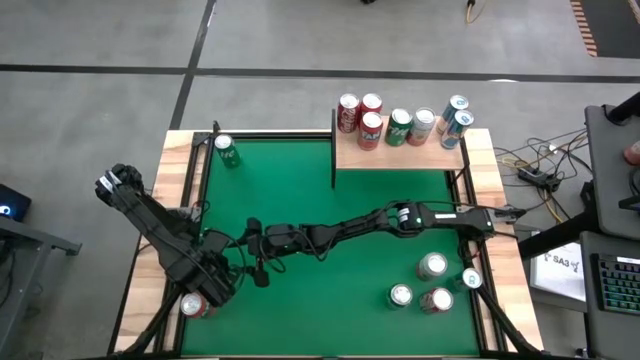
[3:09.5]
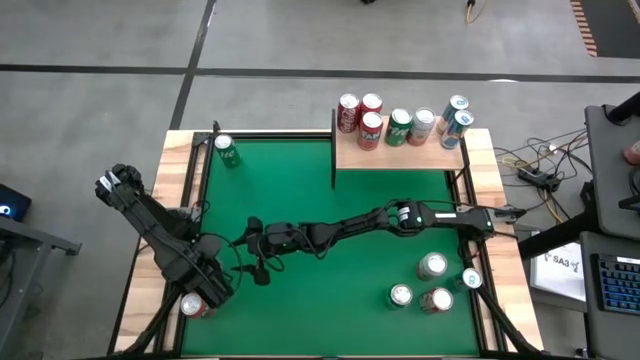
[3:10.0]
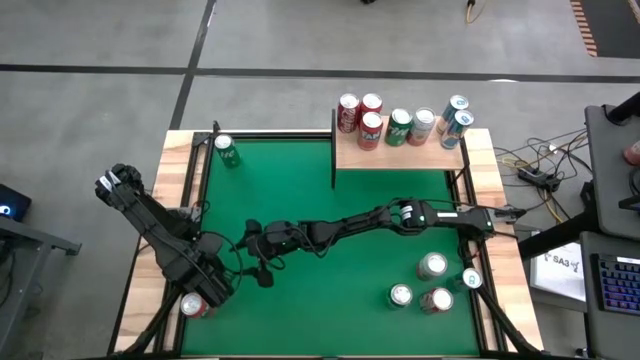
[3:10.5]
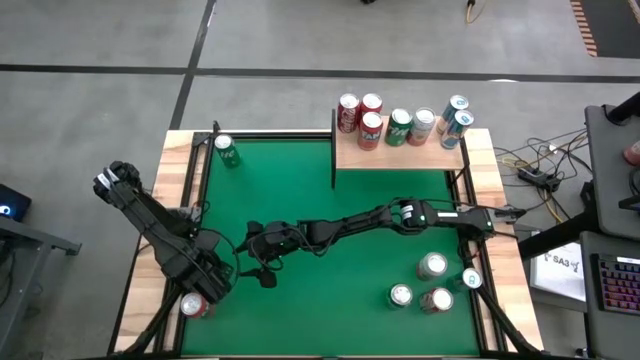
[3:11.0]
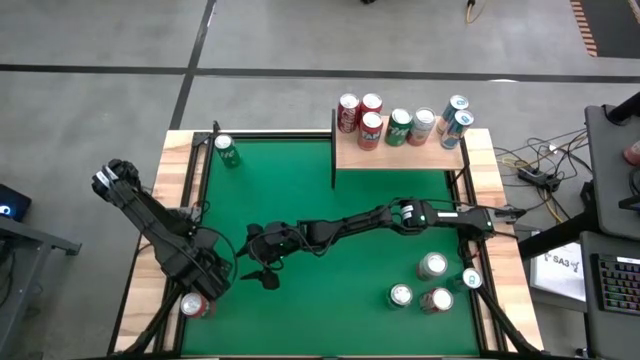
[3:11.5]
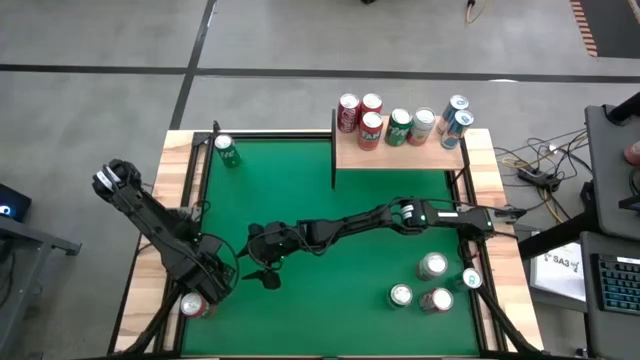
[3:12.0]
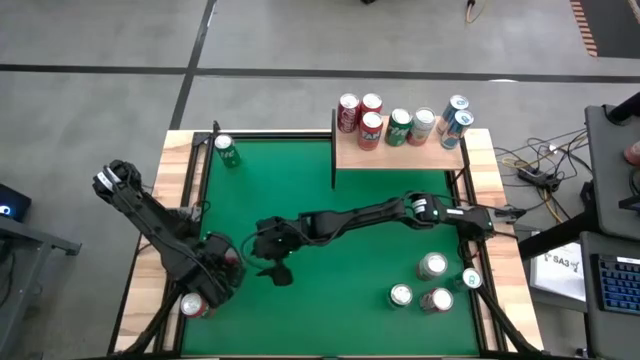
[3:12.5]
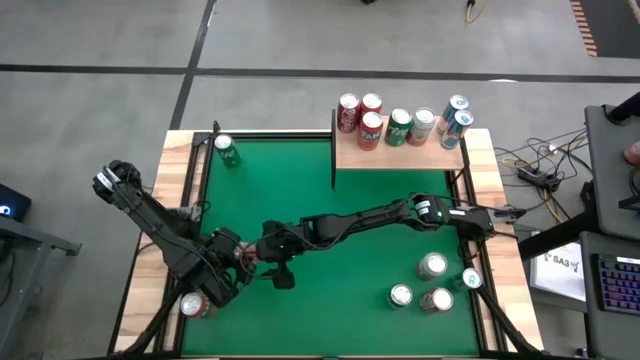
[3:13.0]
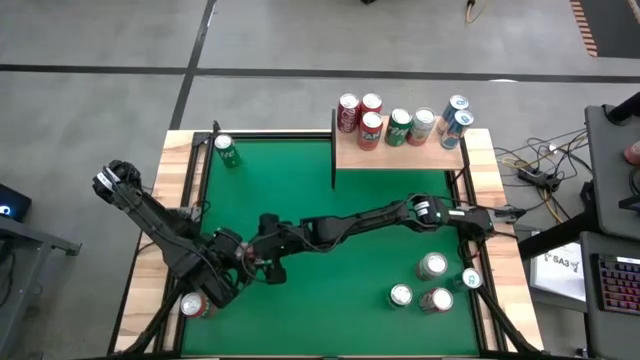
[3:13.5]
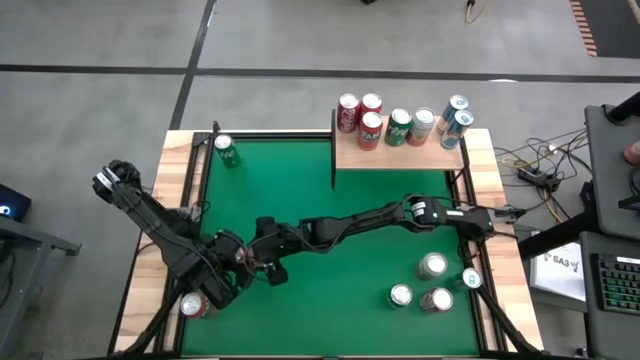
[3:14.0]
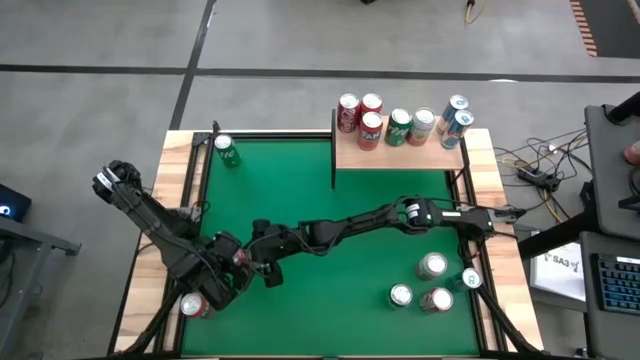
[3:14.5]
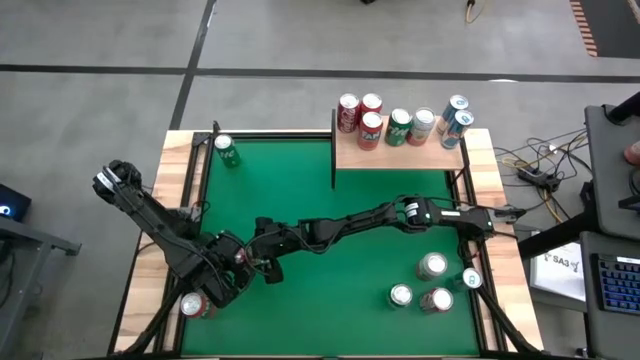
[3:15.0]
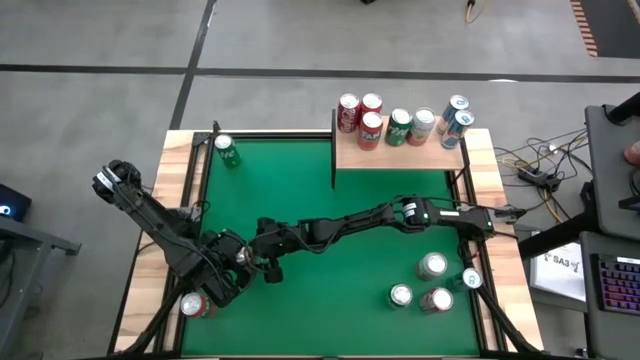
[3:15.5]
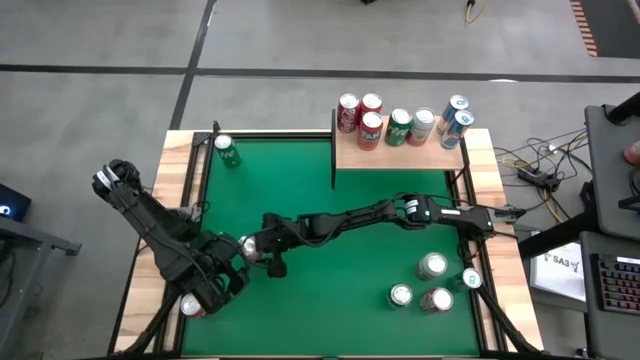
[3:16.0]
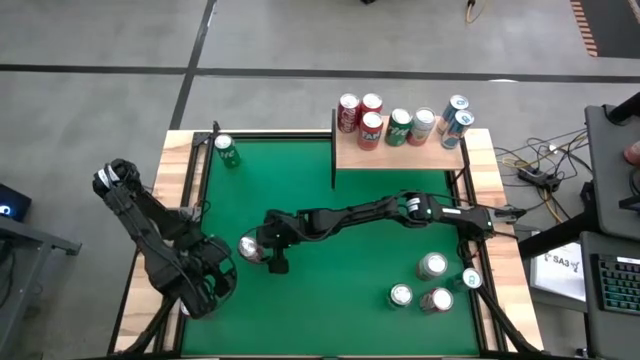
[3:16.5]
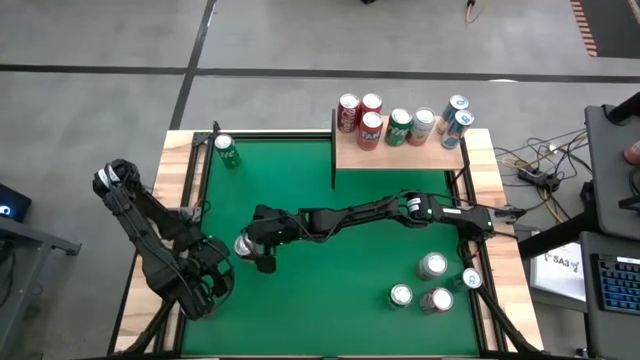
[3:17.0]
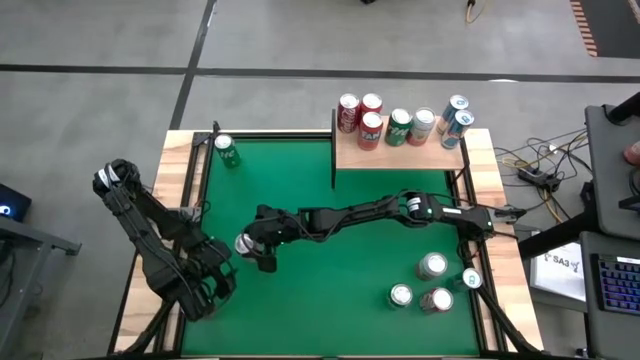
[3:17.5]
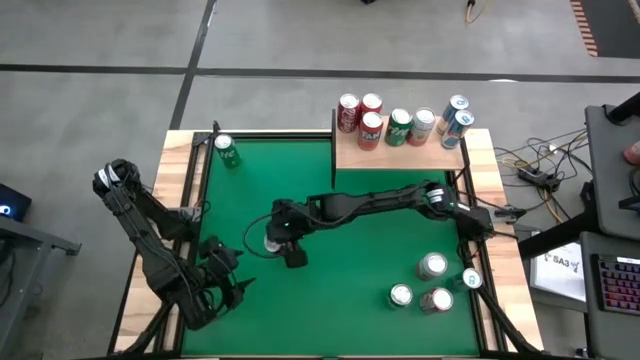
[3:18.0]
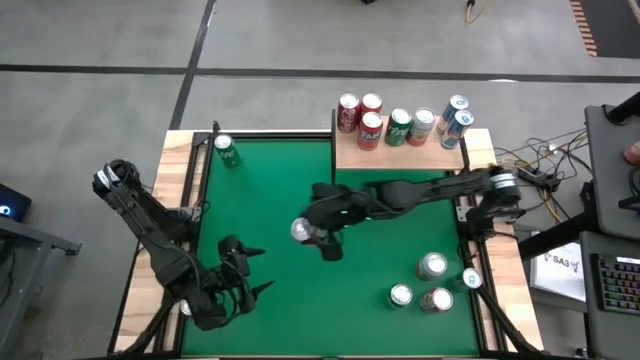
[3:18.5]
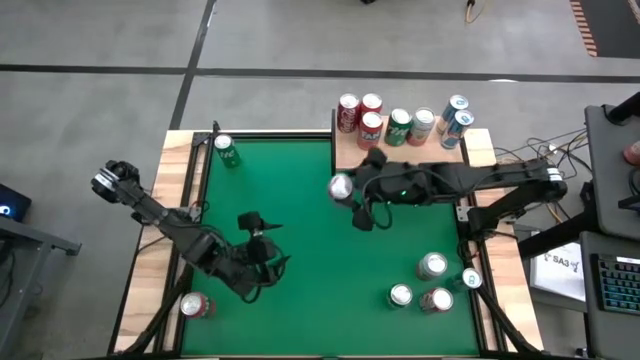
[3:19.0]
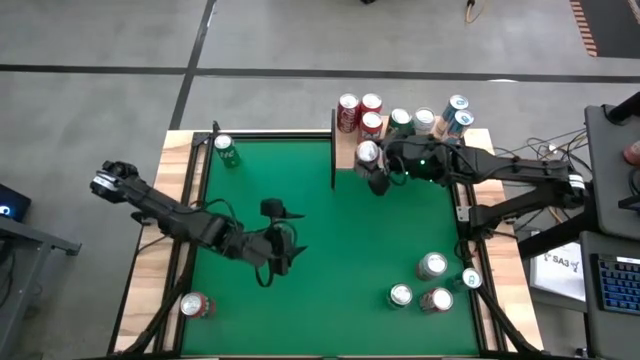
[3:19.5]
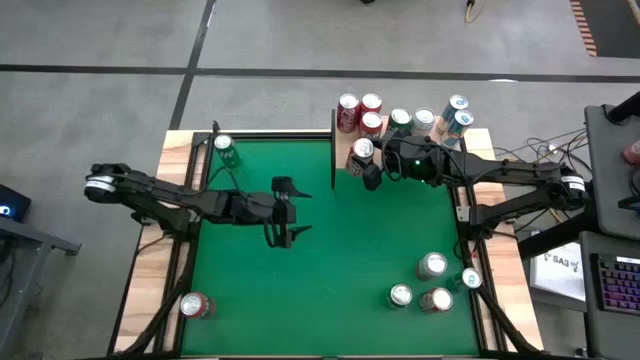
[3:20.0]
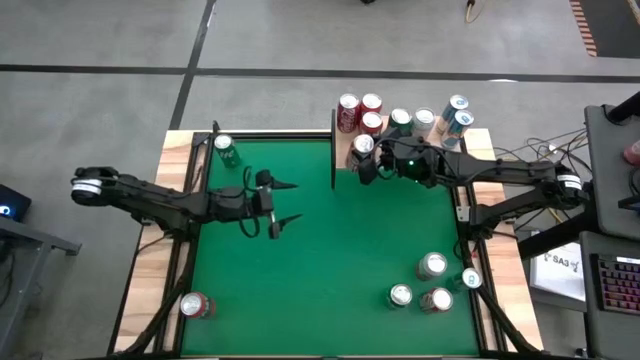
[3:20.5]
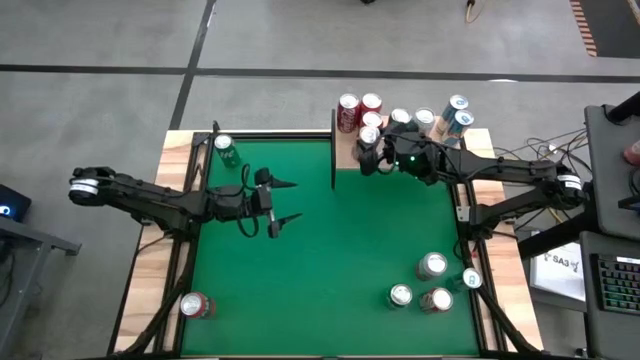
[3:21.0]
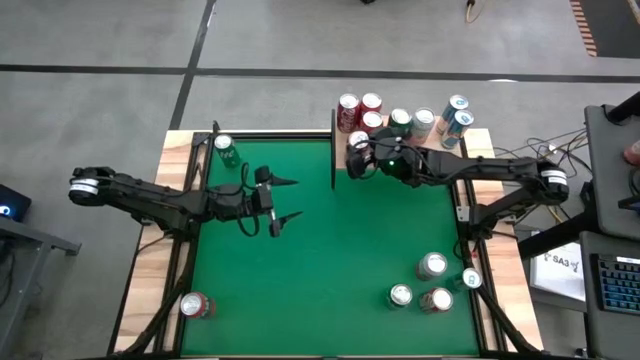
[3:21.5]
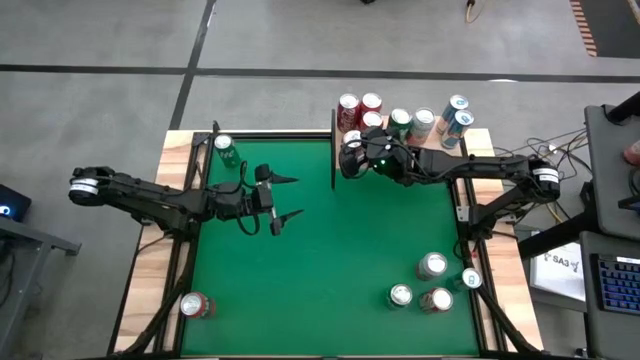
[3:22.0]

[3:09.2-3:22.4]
Task: Place canned beverage on shelf
Put the left red-white soda can on the shelf aligned with the other red-white soda can

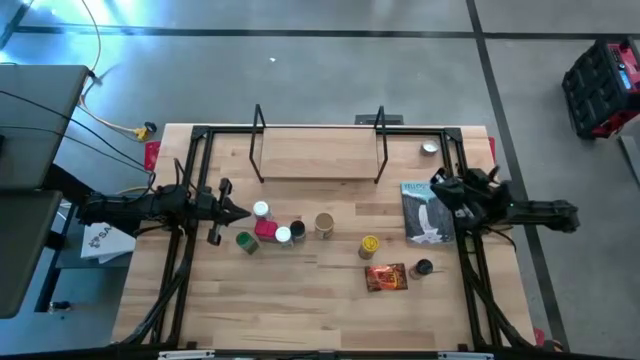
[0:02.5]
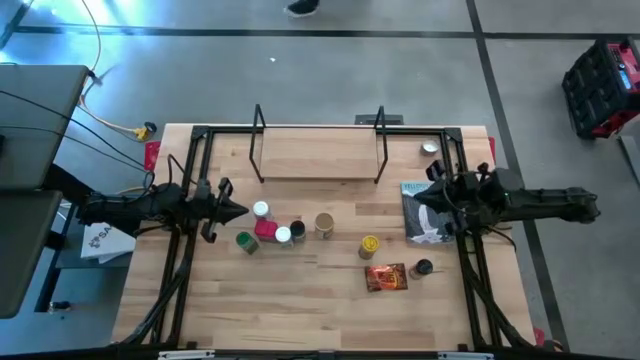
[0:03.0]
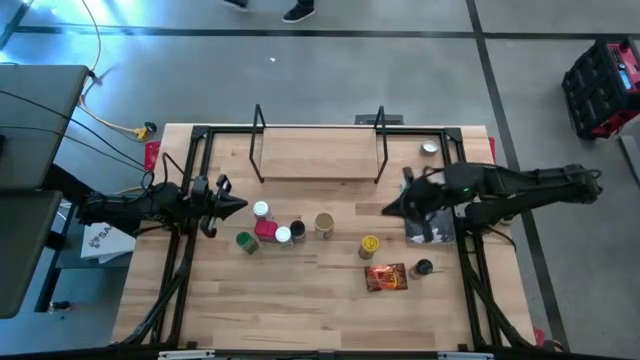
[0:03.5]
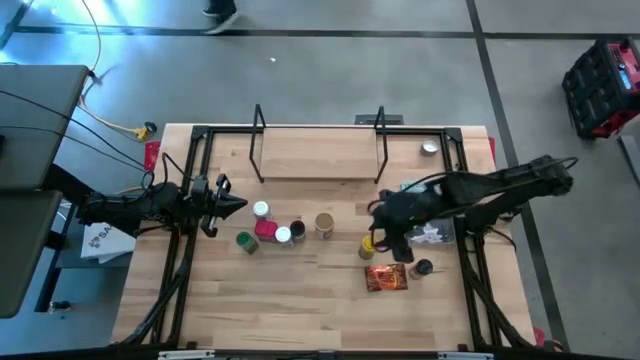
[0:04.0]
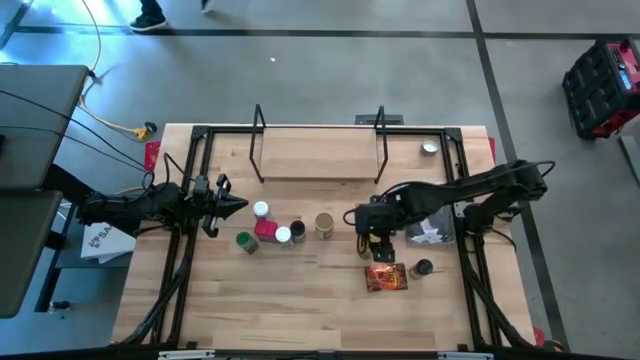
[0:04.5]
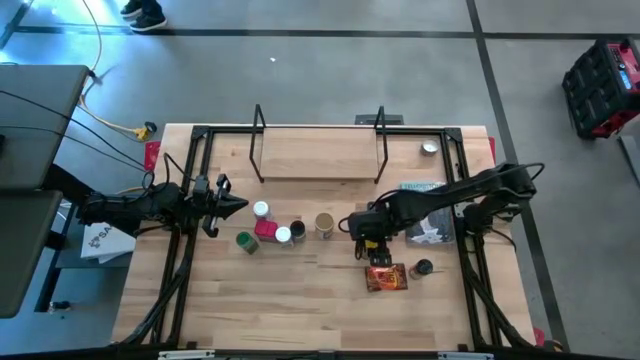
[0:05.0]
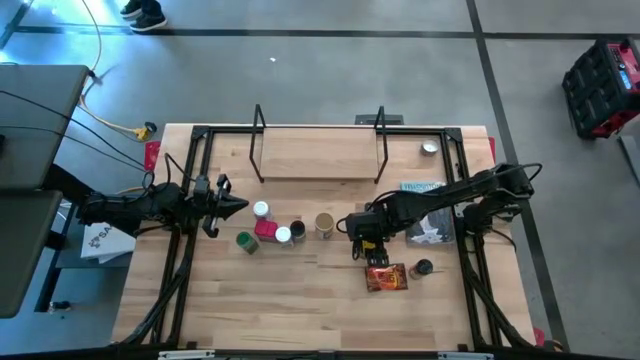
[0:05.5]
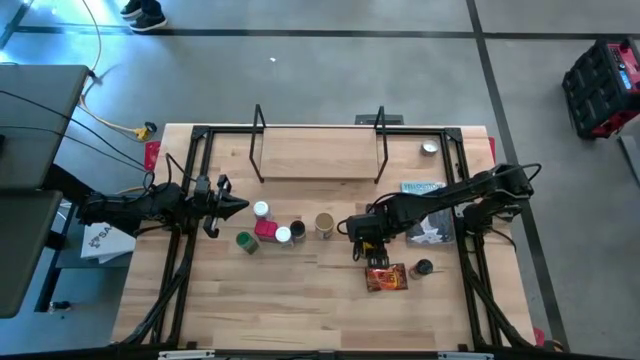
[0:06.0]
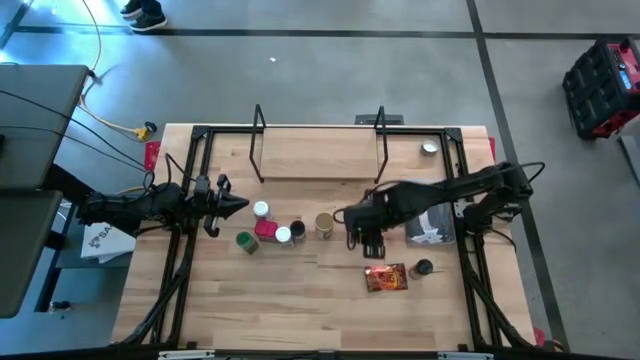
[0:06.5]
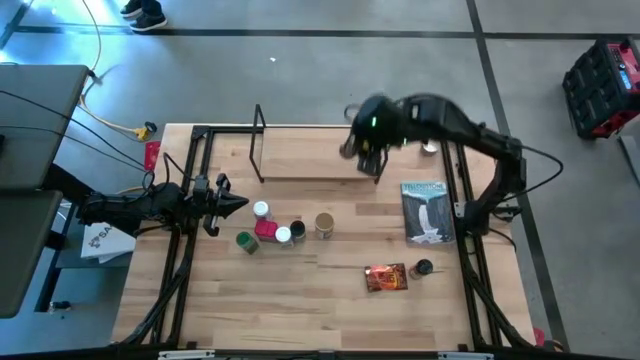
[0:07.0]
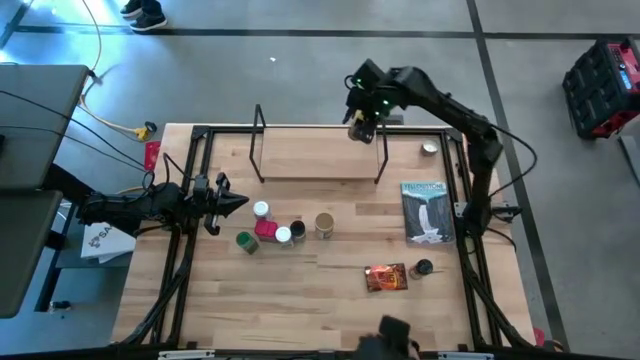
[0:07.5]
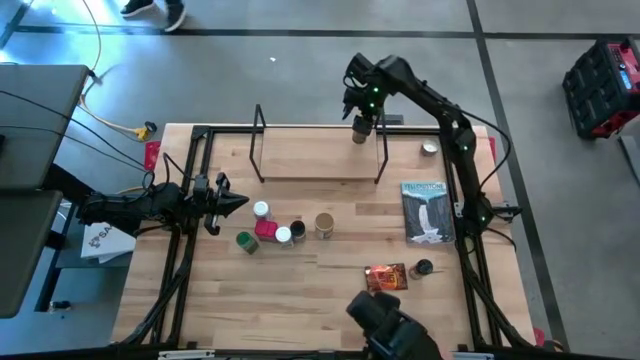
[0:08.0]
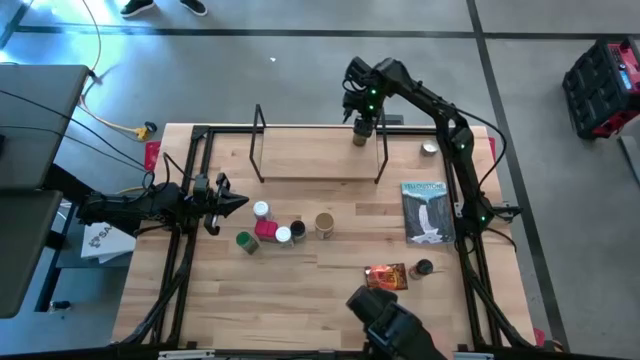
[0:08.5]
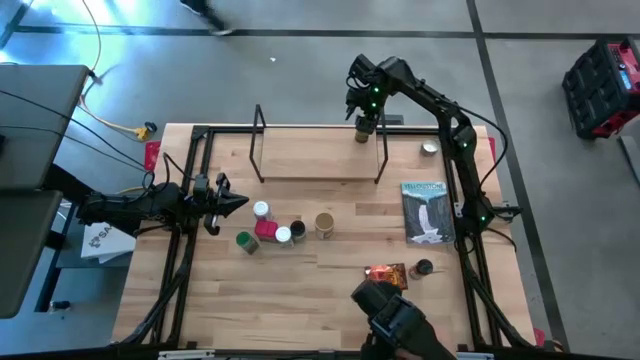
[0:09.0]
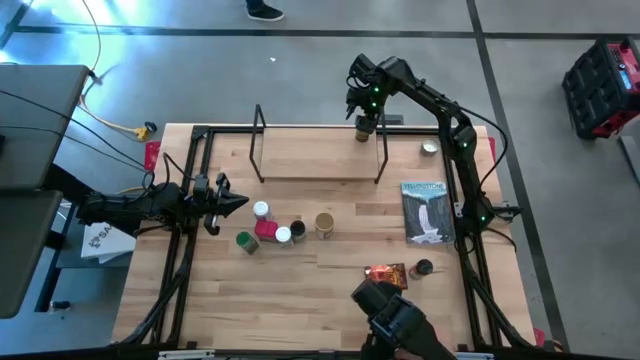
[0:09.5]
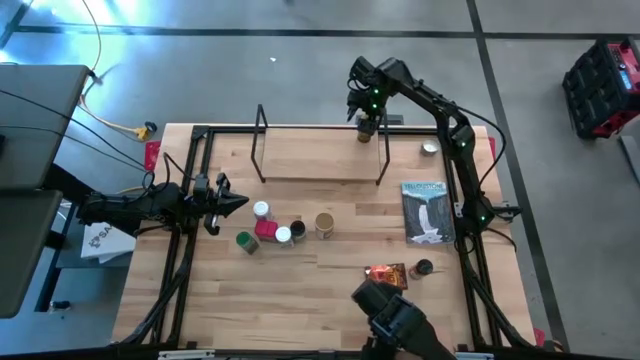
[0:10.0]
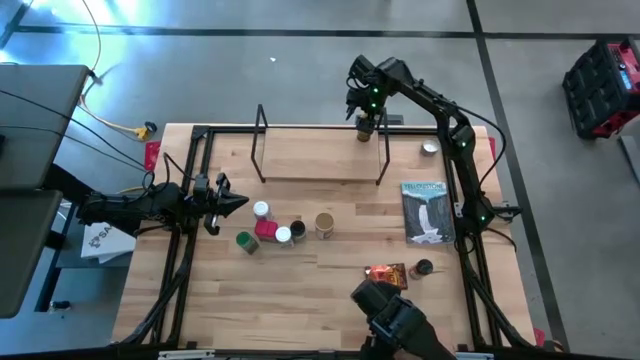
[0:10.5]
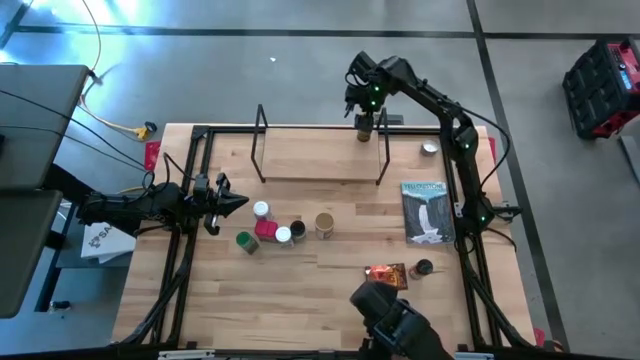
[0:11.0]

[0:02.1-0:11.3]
Task: Shelf spices
Put the yellow seasoning bottle on the shelf
